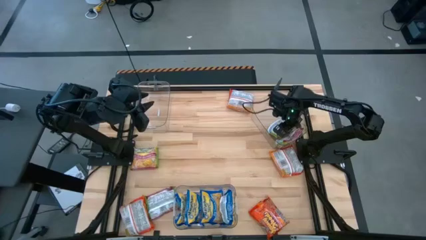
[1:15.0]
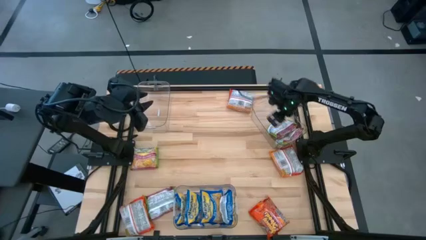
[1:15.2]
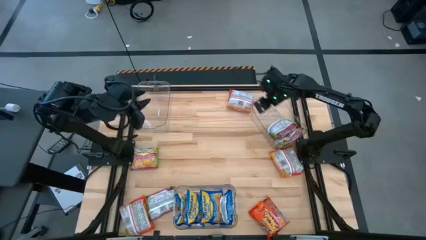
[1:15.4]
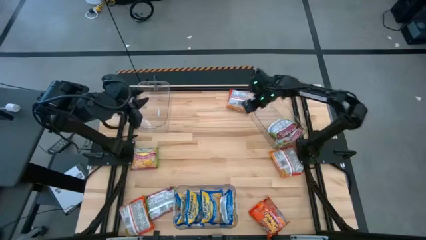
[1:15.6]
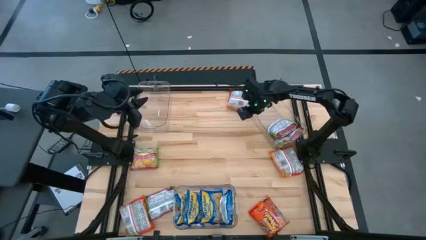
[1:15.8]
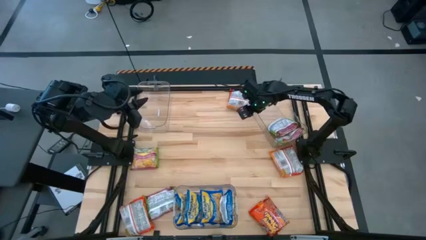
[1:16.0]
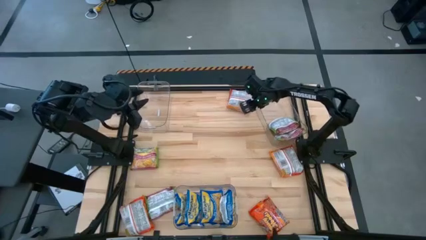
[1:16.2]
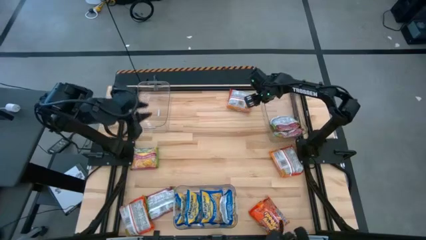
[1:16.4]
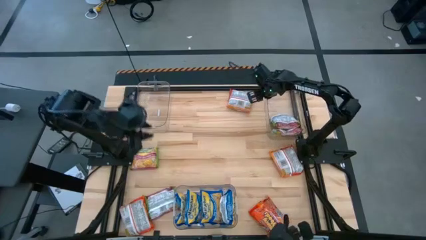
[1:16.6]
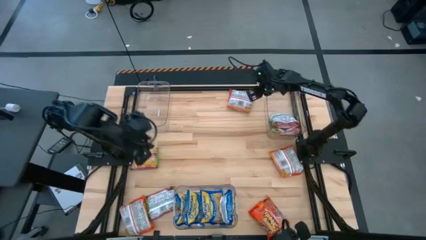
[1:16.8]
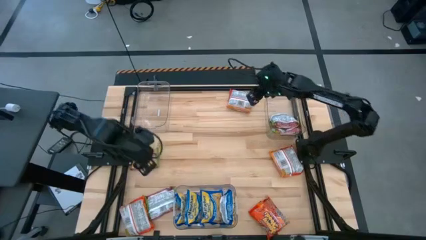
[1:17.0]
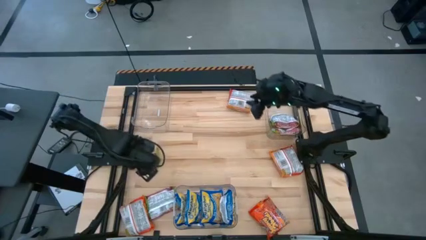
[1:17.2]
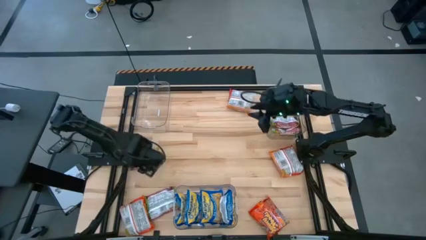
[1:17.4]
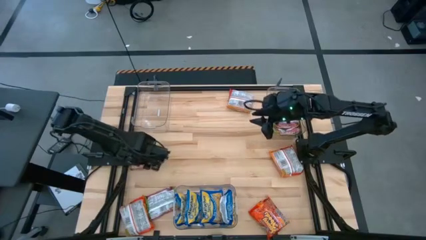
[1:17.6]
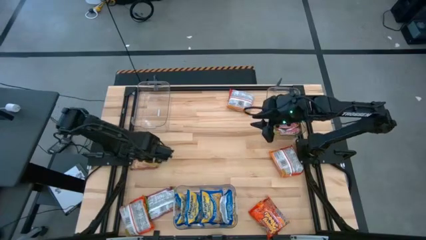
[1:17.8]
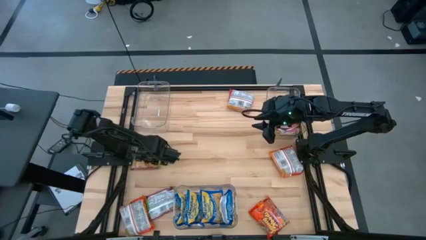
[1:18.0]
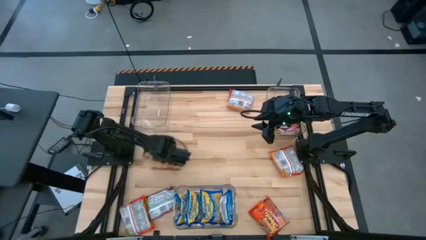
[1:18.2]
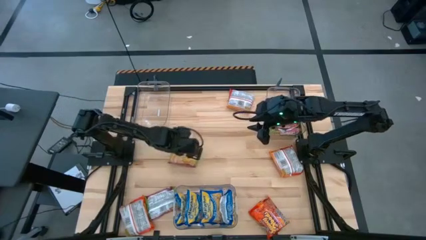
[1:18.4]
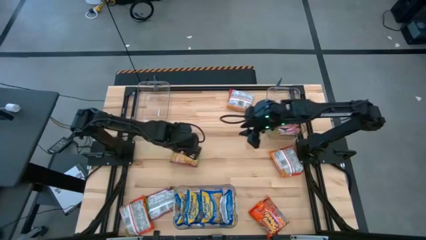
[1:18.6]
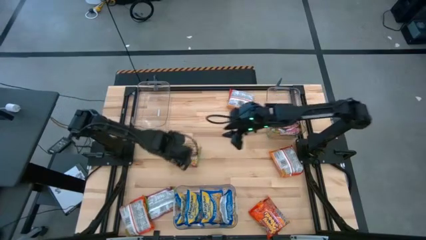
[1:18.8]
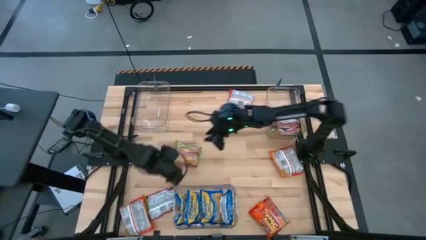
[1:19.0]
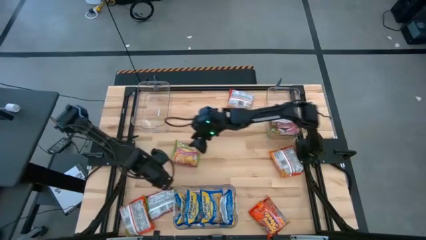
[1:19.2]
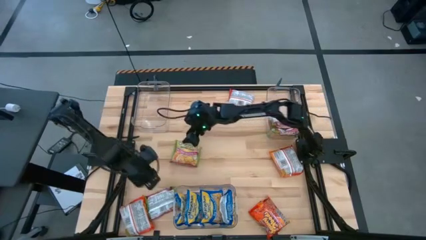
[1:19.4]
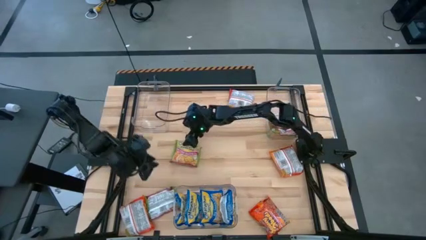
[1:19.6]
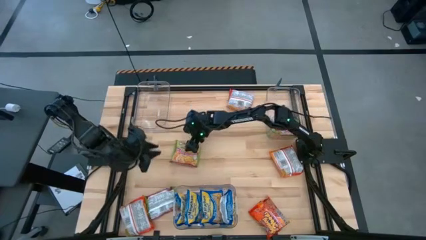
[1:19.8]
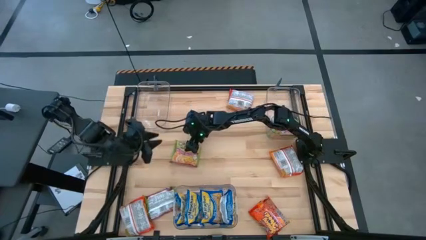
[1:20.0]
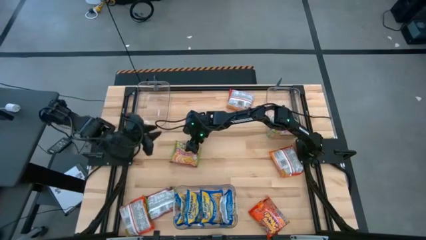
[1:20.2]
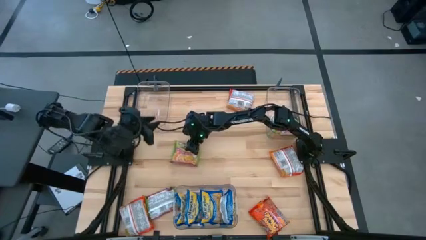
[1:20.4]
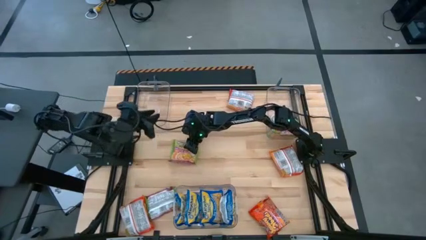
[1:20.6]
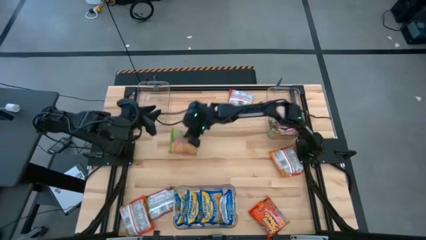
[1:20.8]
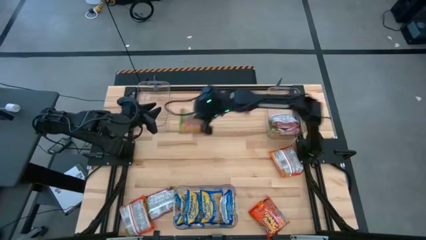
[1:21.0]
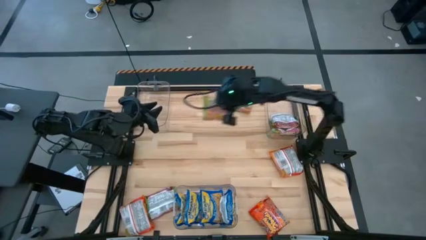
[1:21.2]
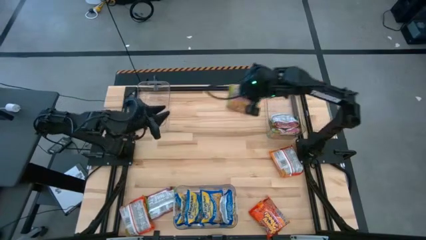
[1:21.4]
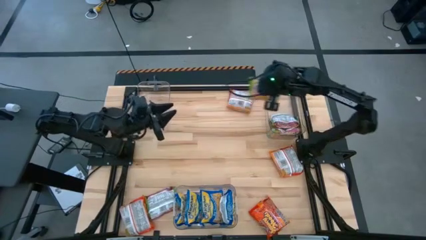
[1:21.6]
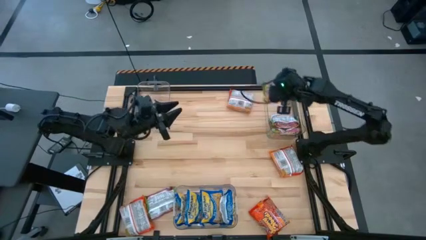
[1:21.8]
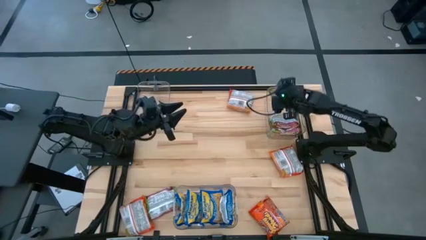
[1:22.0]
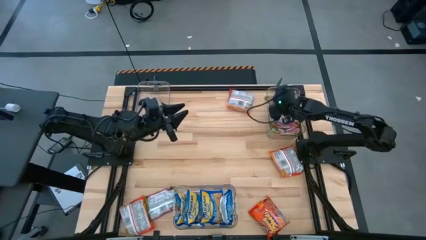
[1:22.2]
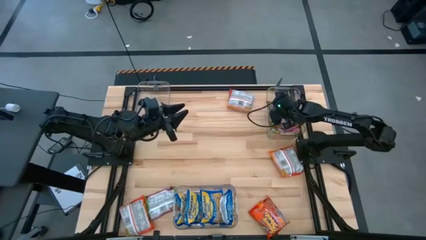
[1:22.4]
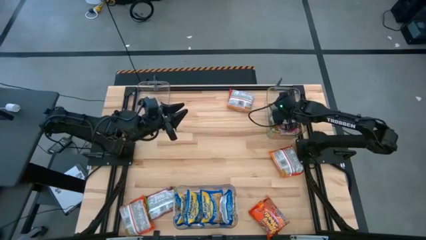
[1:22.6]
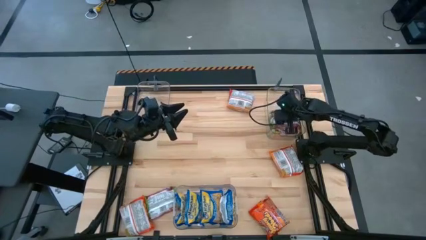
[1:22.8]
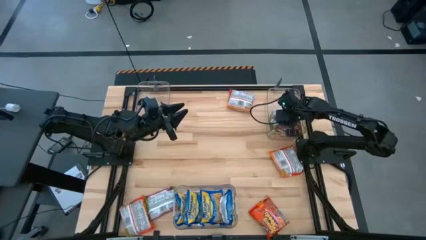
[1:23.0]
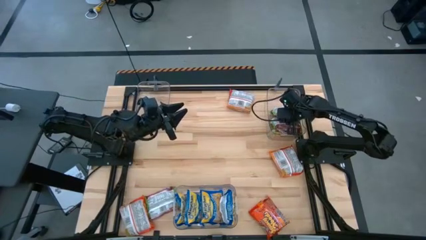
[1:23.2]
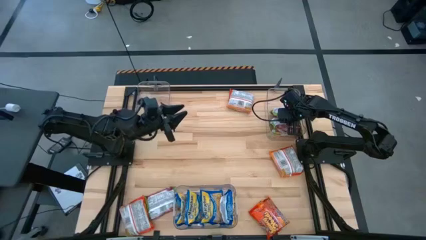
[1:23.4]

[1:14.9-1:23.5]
Task: Sort Maruchan noodles
Put the green noodle pack into the top right transparent bin

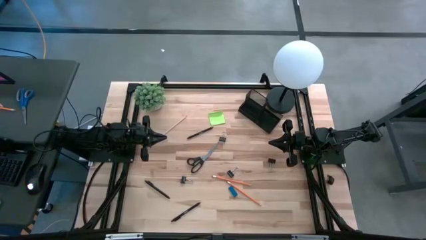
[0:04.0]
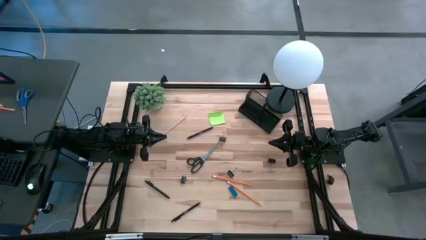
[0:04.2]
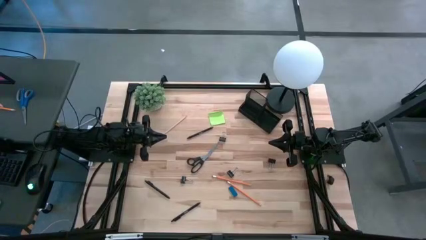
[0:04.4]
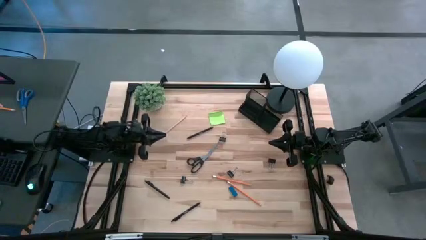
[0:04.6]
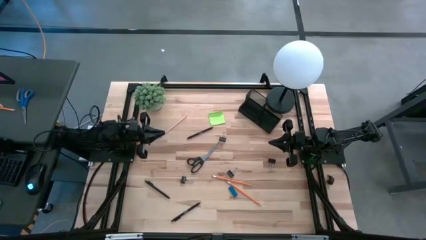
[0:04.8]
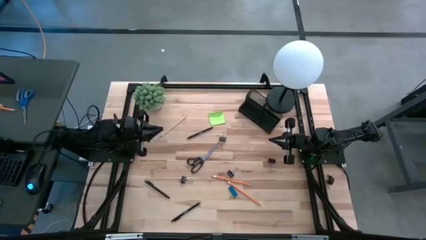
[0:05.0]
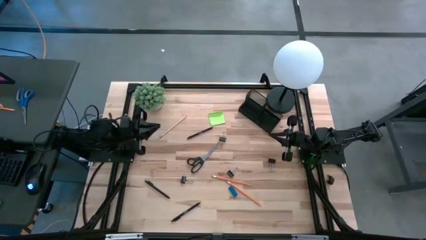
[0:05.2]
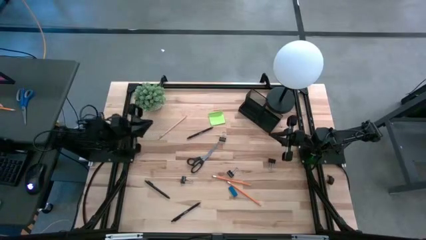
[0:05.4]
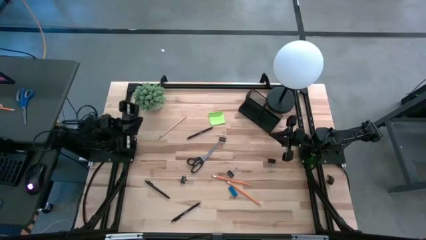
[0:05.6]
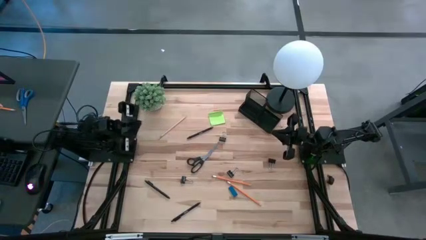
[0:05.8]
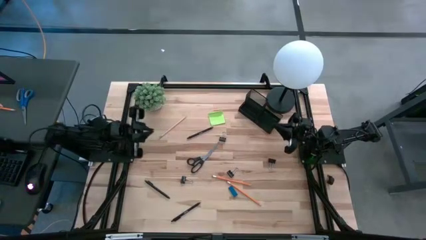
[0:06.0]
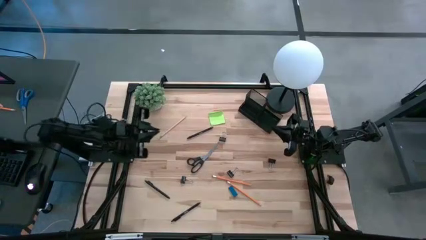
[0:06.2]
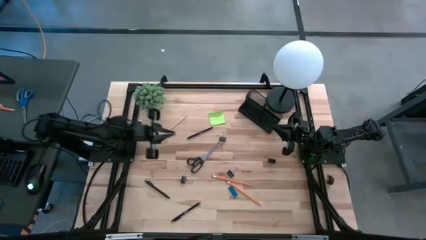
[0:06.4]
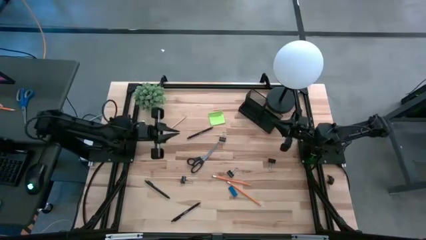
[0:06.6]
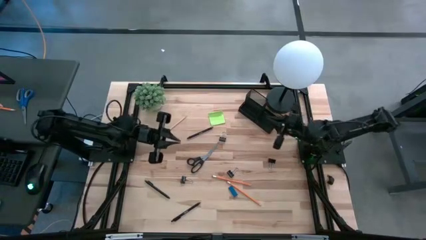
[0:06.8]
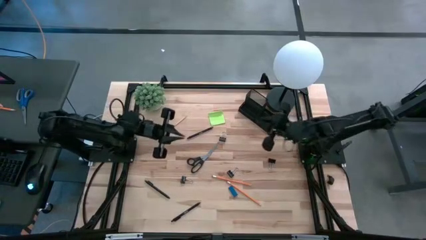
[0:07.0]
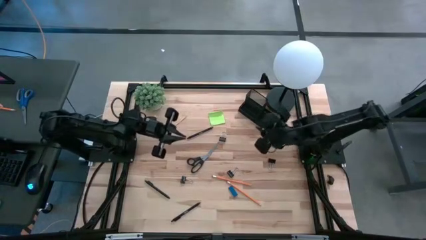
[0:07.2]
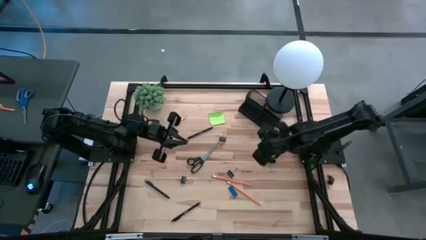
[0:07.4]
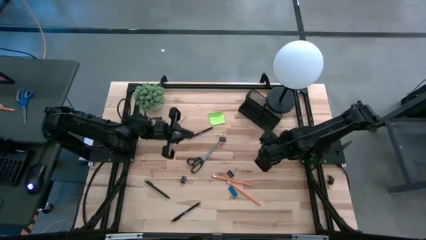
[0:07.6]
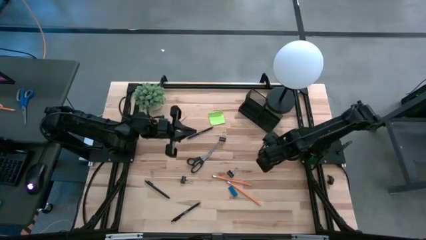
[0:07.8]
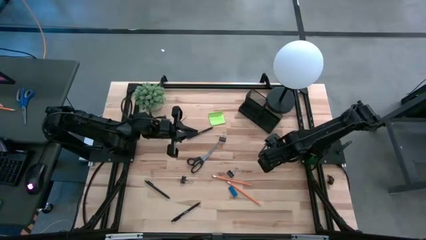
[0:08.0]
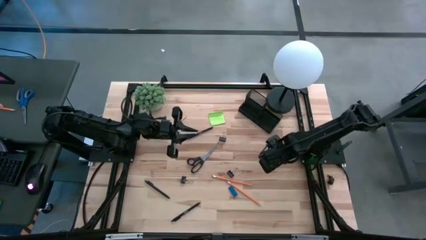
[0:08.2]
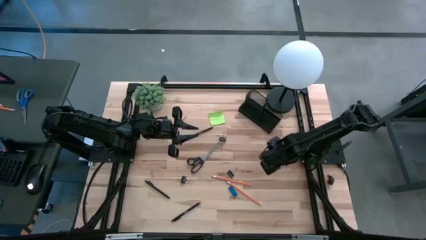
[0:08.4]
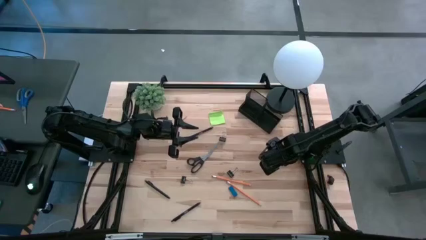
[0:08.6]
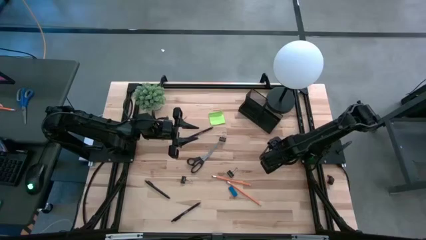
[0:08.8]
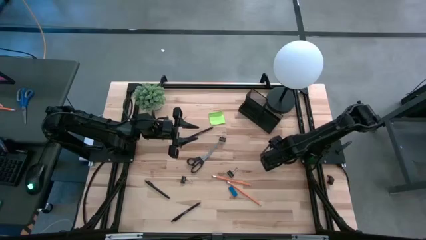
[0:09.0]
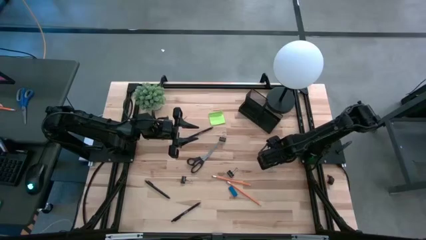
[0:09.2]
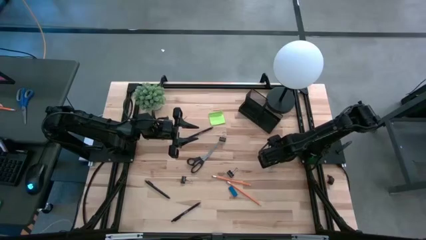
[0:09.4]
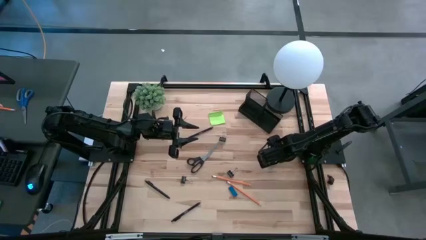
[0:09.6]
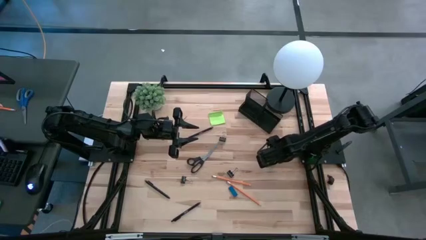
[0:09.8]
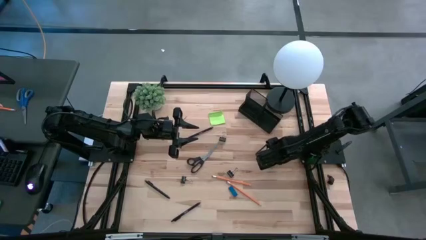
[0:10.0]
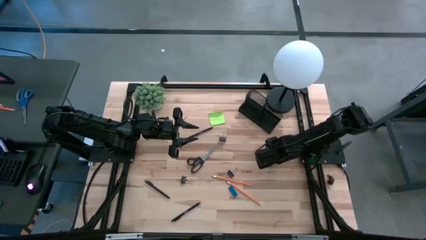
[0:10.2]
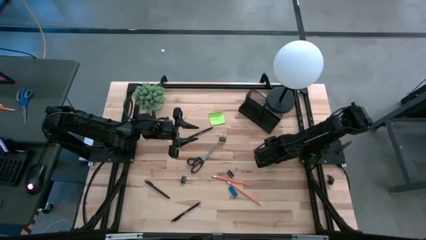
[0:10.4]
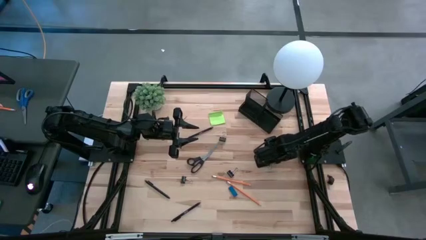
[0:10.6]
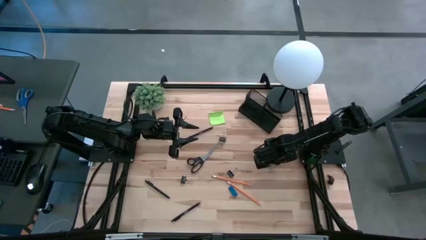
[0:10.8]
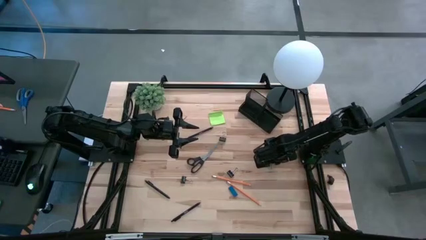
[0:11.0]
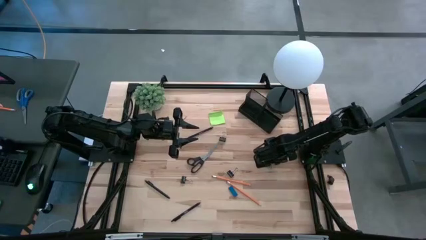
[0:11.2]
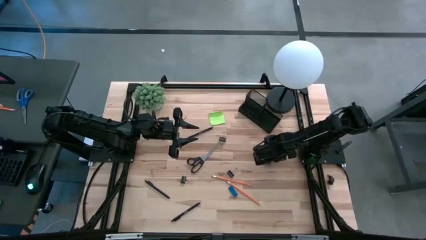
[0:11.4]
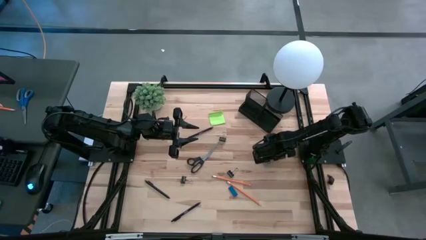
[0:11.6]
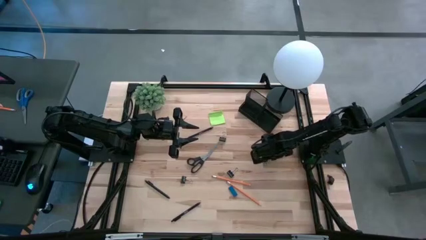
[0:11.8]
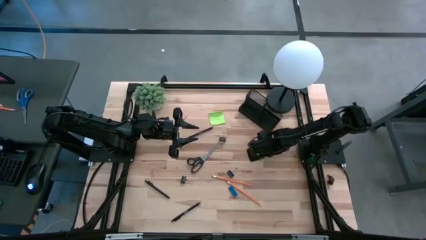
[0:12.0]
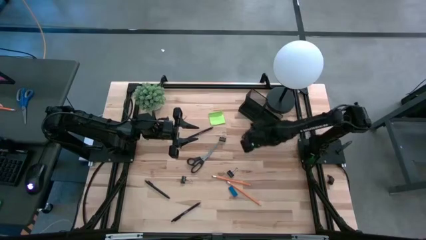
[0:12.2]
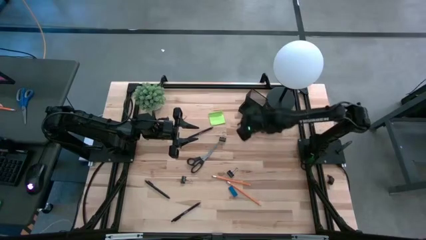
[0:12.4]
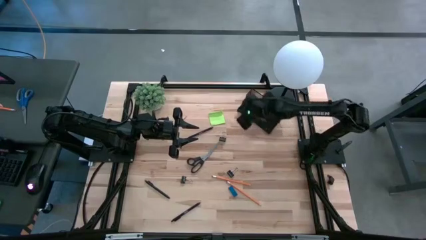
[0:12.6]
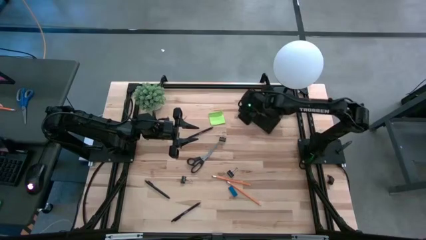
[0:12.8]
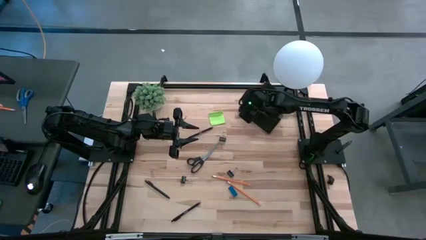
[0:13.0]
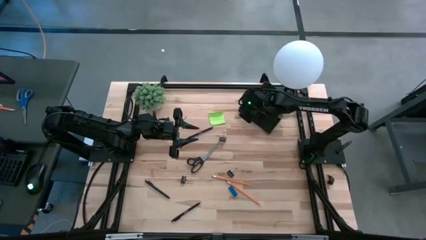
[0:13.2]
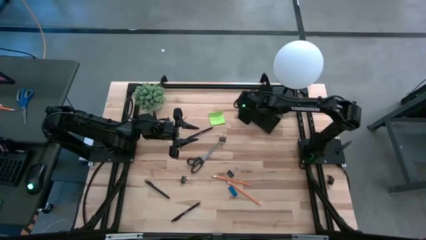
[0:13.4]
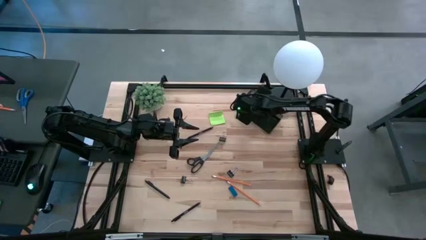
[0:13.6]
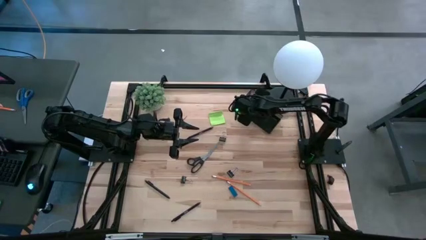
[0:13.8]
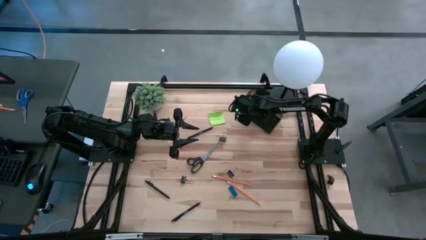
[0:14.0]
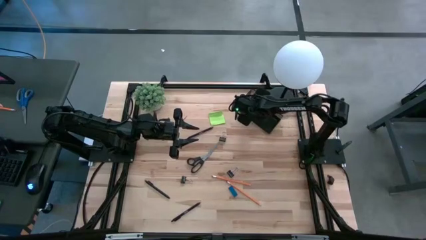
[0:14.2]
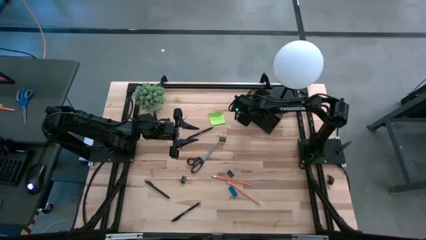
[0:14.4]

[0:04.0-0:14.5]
Task: Pick and place office supplies into organizer
Put the black binder clip into the black desk organizer
